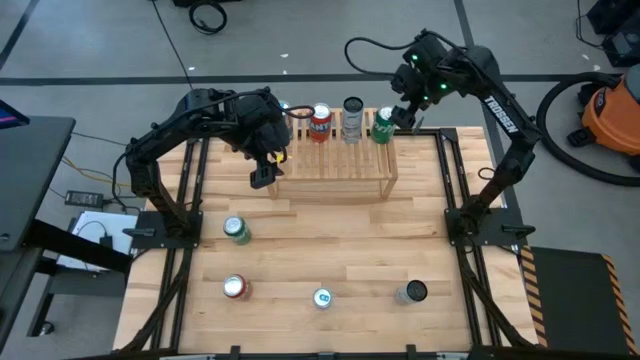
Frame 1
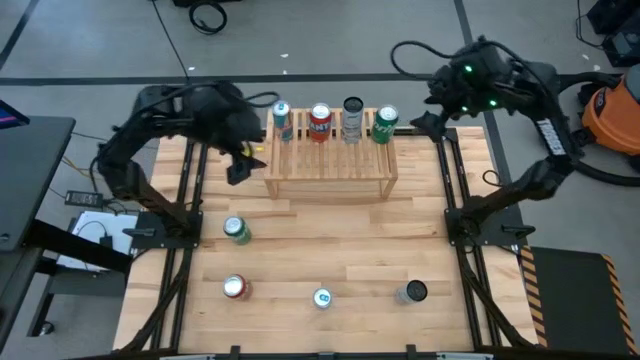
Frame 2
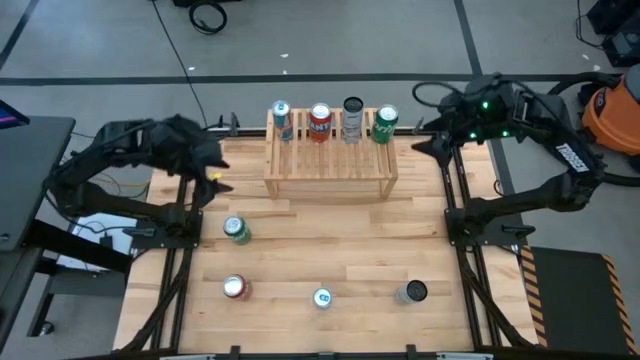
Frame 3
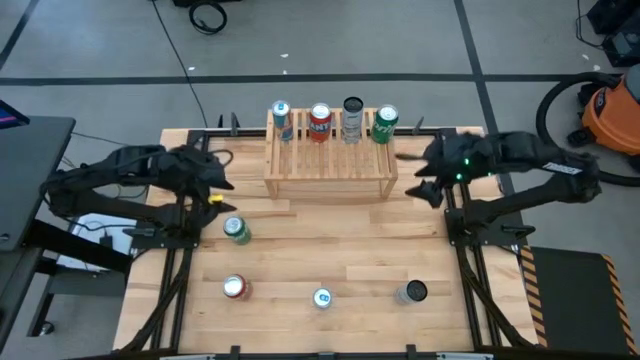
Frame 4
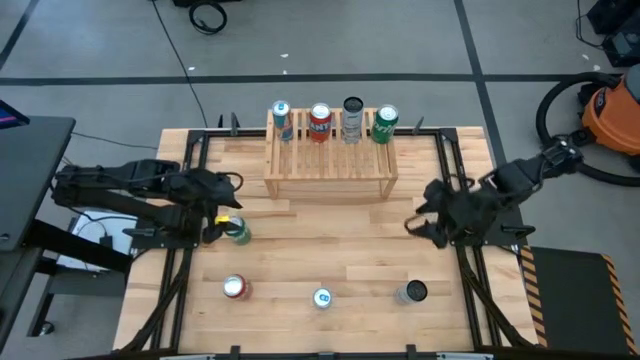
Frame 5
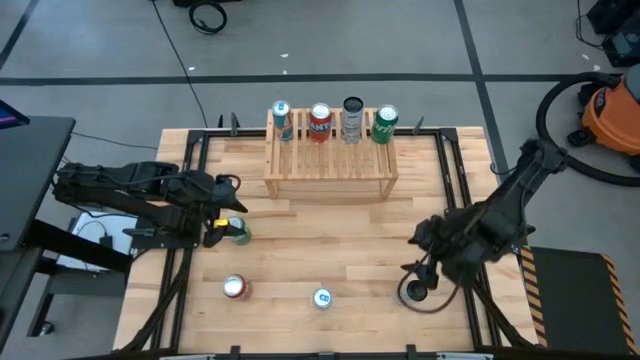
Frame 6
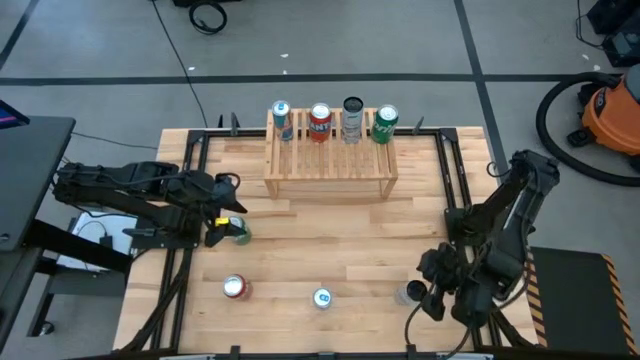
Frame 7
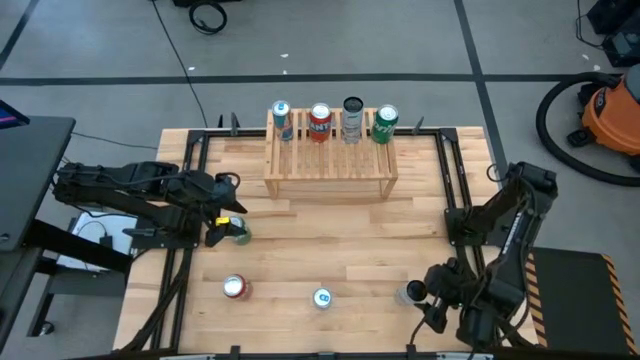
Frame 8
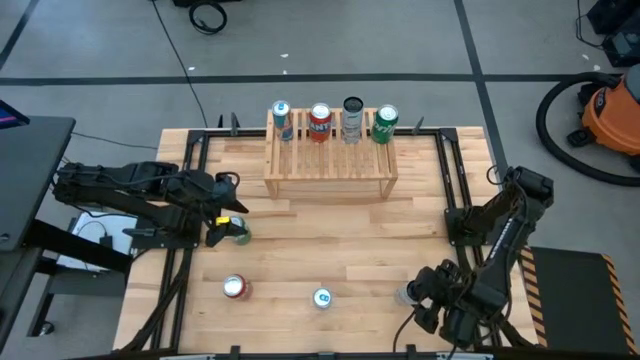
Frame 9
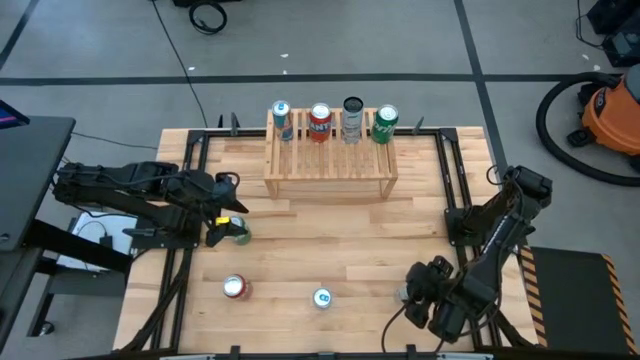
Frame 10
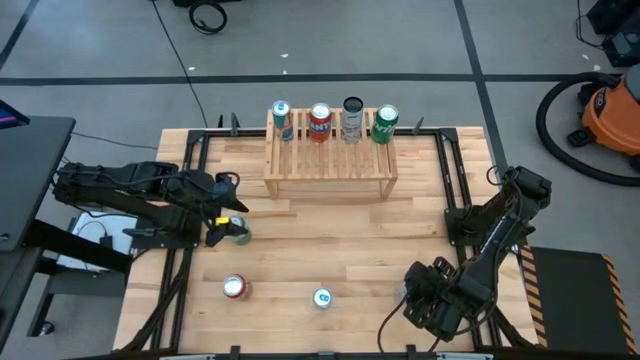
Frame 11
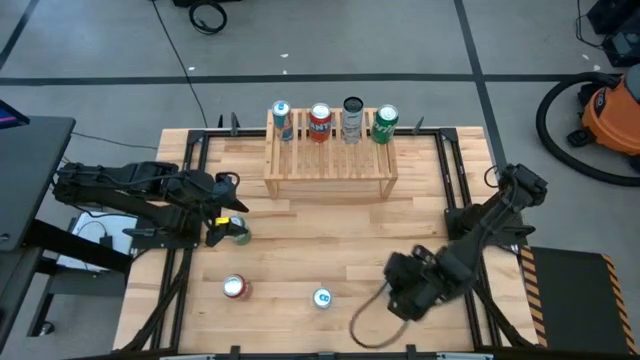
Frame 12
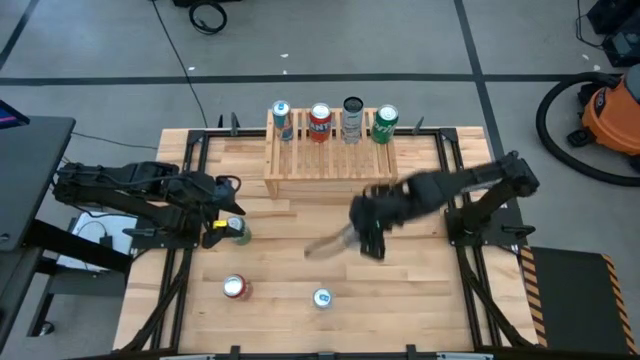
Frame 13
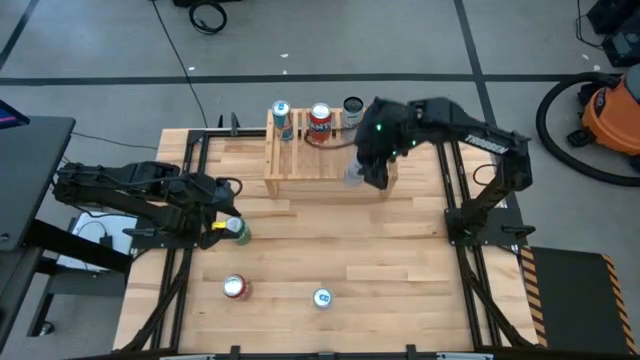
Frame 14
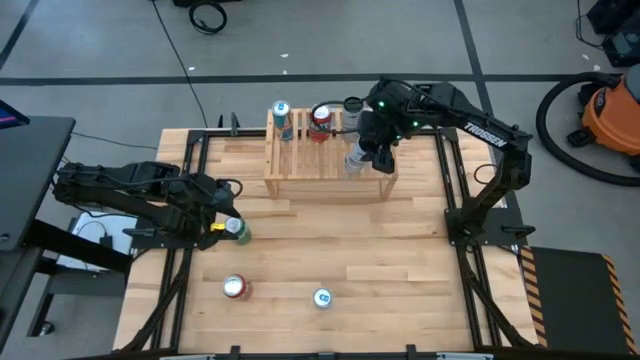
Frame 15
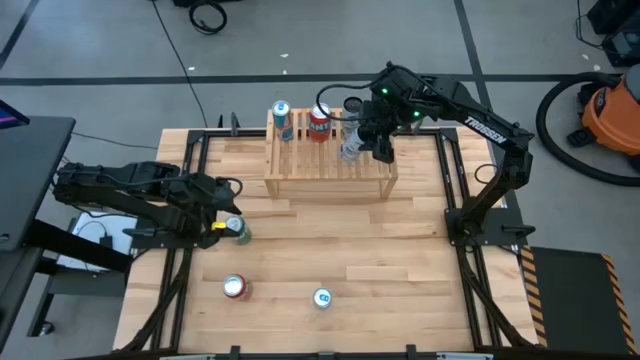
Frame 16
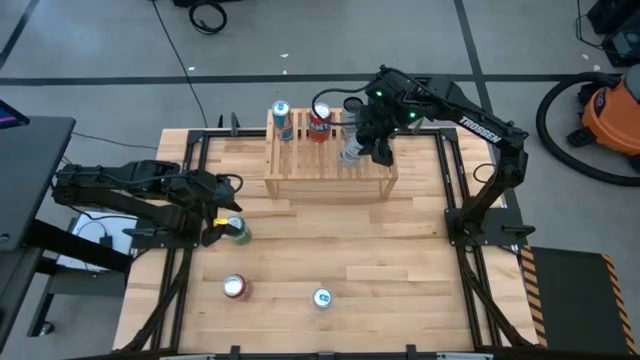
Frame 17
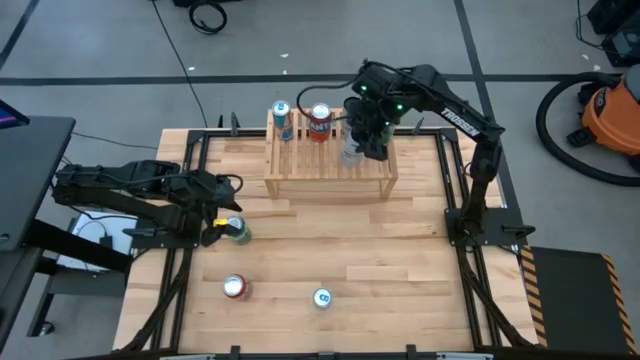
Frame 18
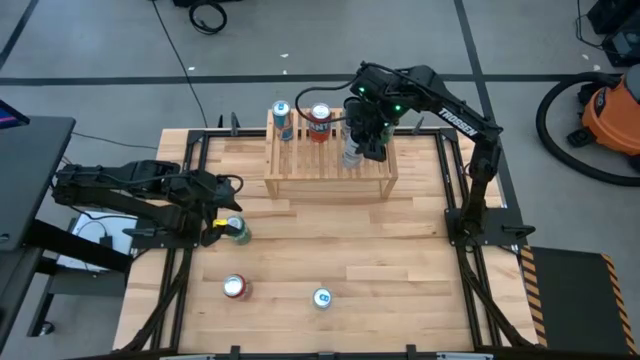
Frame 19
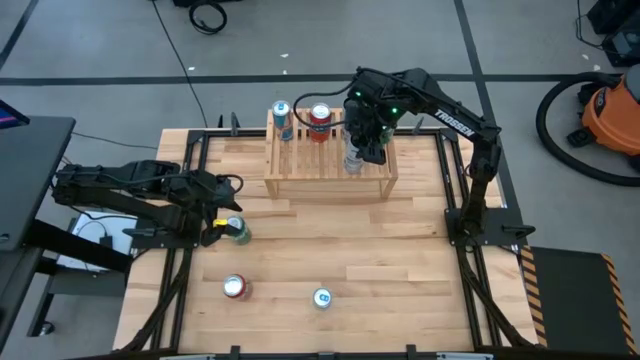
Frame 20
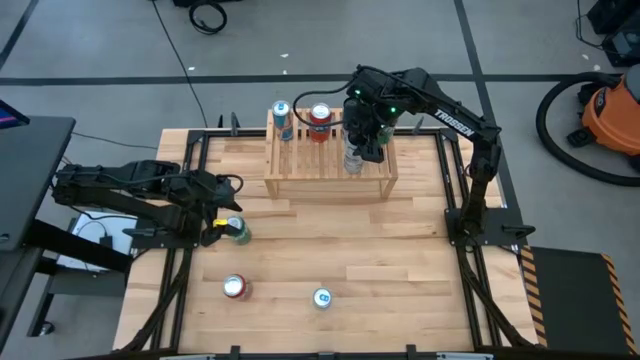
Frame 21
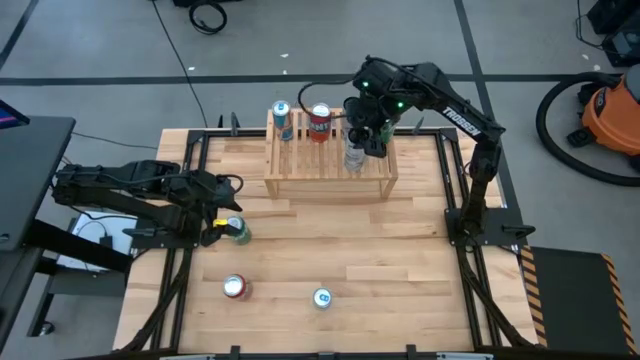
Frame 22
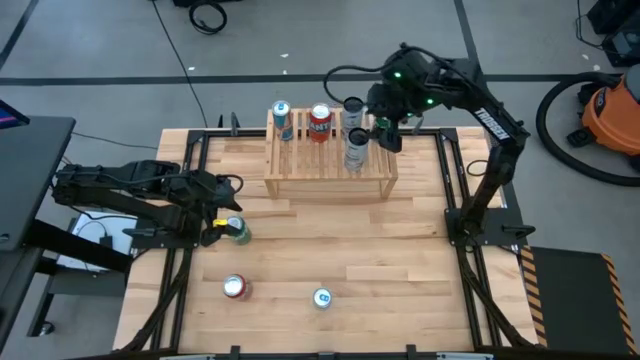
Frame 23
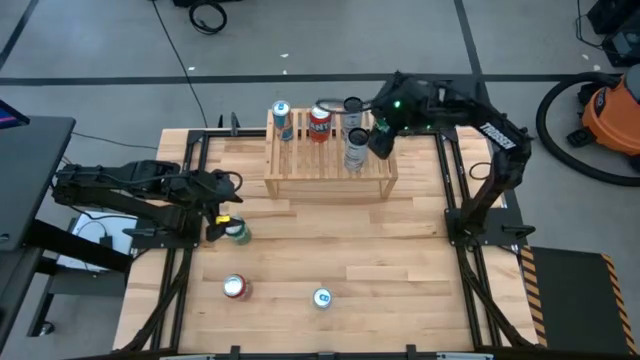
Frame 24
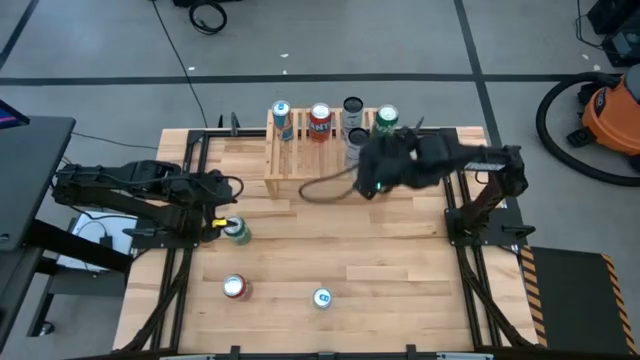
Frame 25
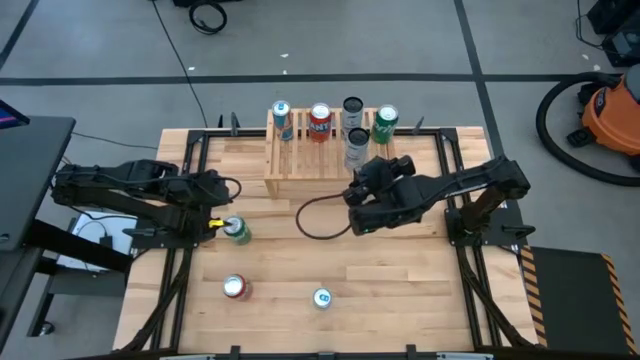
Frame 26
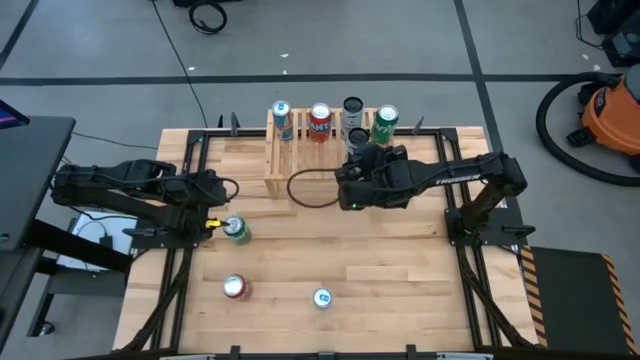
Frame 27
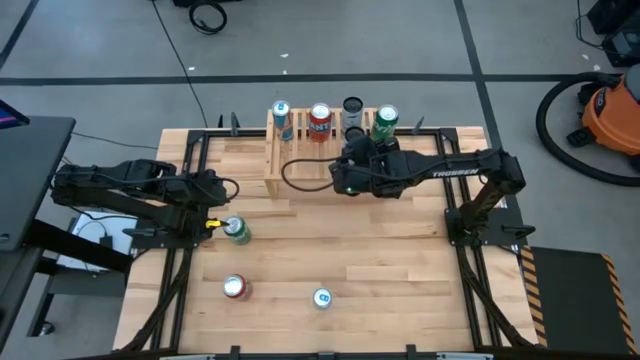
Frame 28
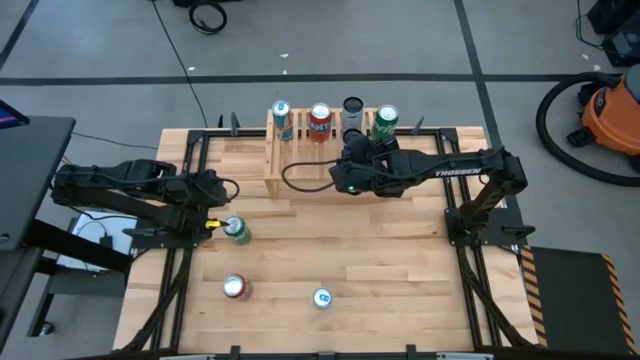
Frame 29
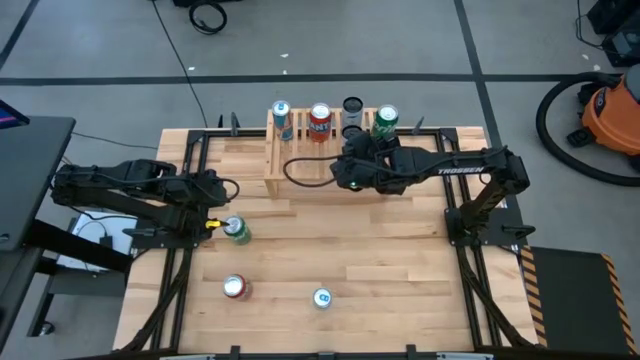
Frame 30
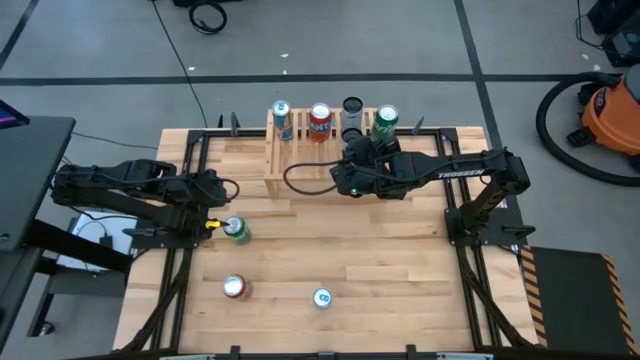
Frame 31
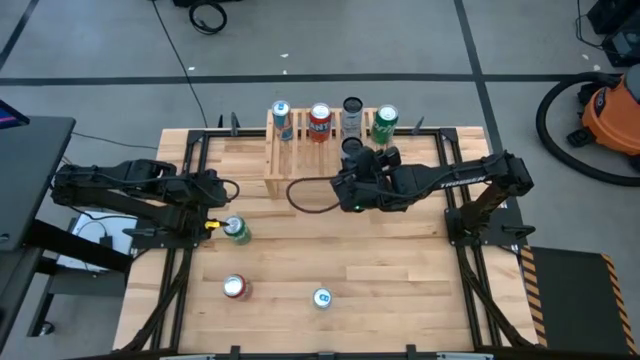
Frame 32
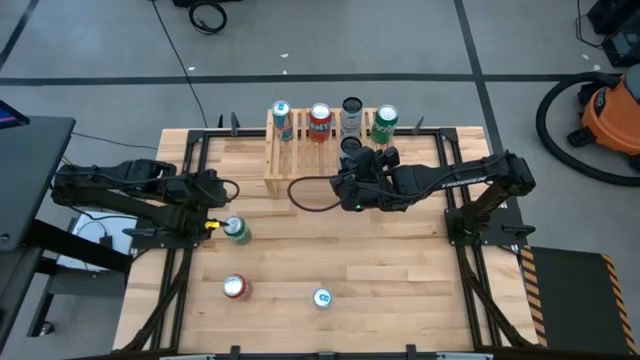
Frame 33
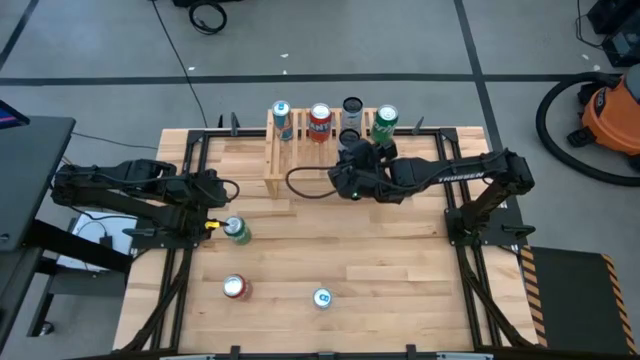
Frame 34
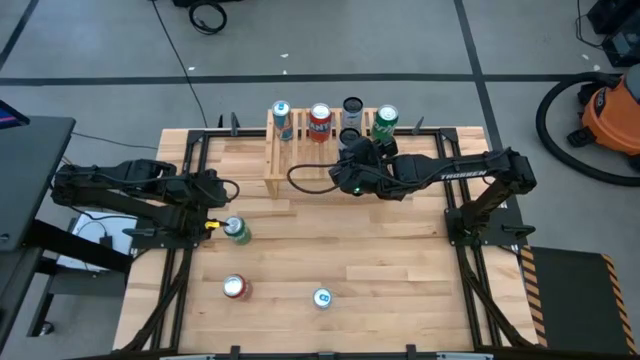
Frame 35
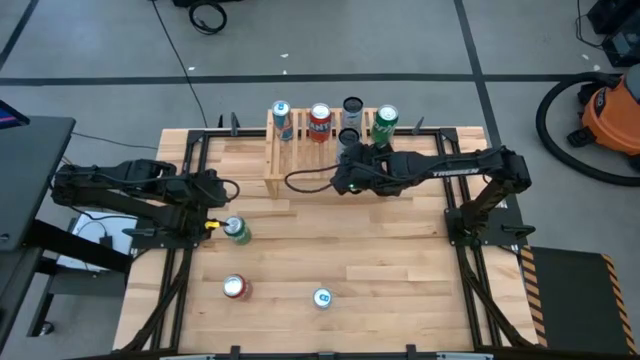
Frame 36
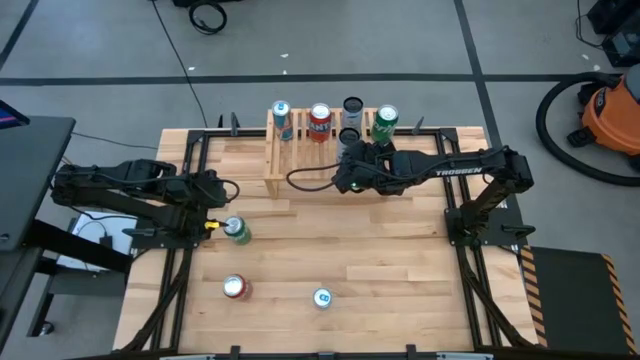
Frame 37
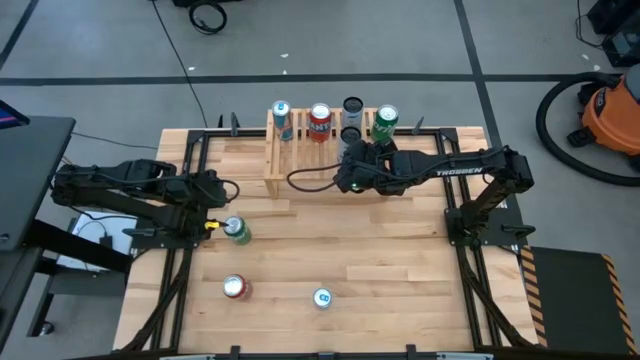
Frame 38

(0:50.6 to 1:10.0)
Task: Place canned beverage on shelf
Put the white-blue soda can on the shelf aligned with the other white-blue soda can

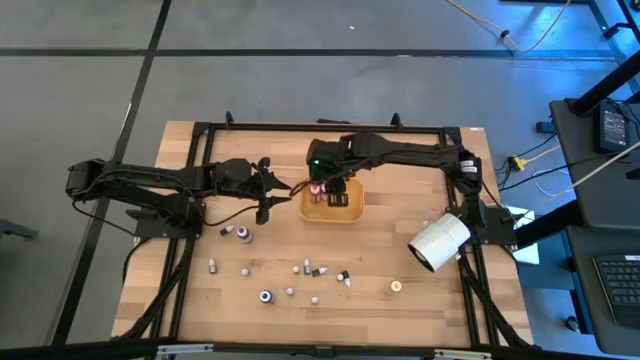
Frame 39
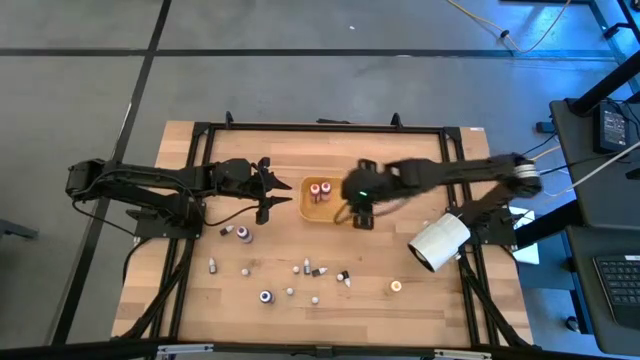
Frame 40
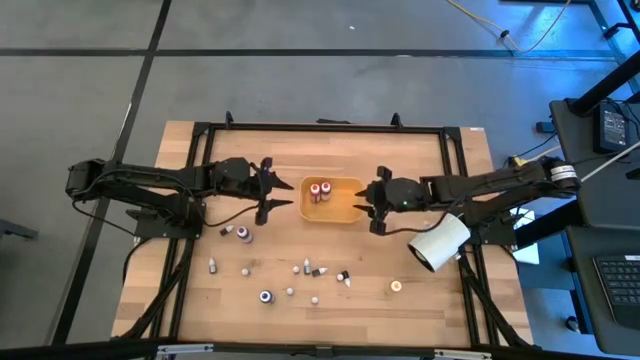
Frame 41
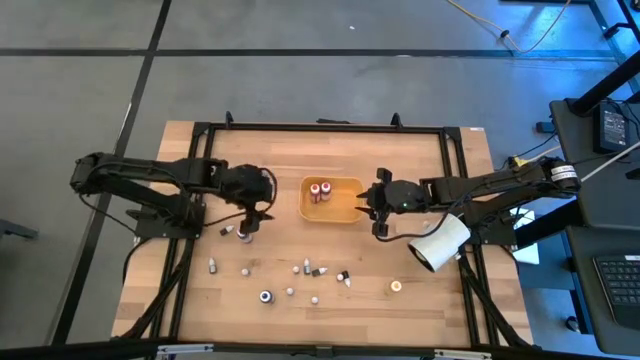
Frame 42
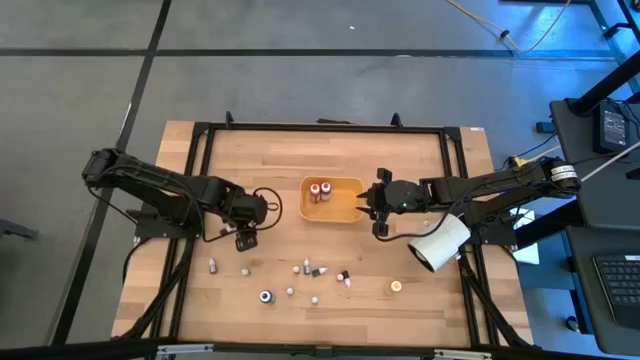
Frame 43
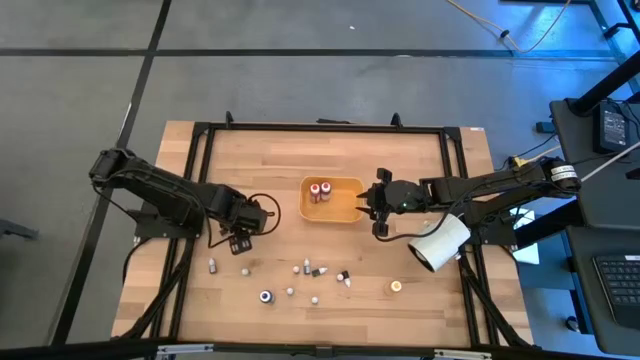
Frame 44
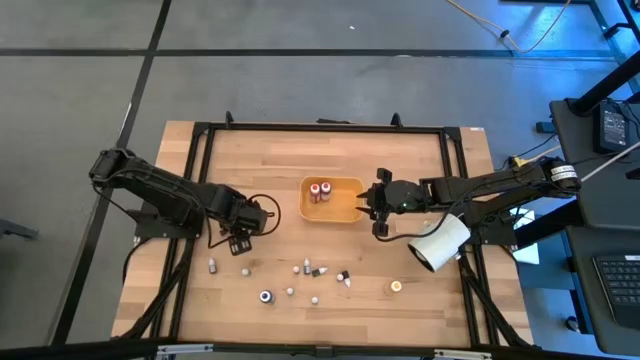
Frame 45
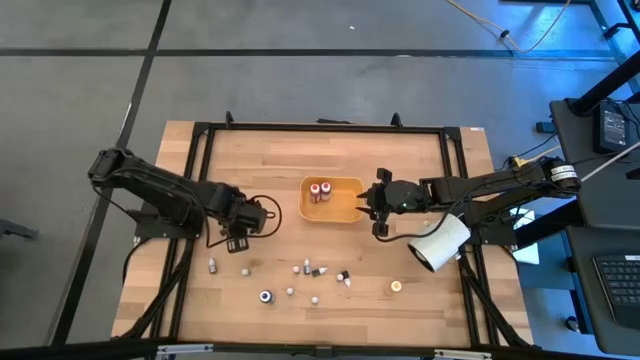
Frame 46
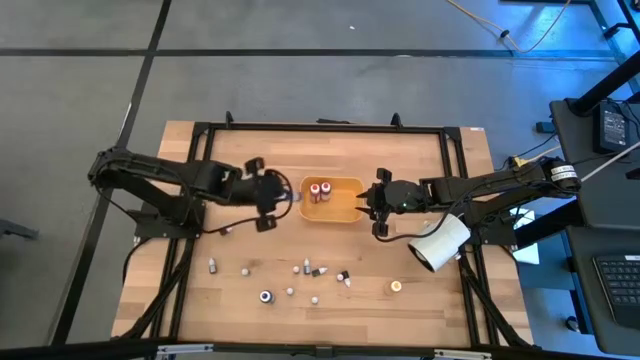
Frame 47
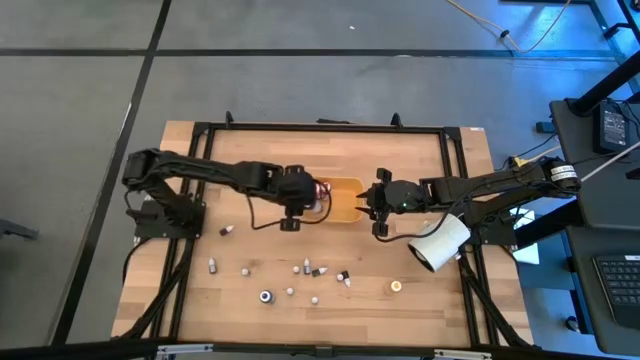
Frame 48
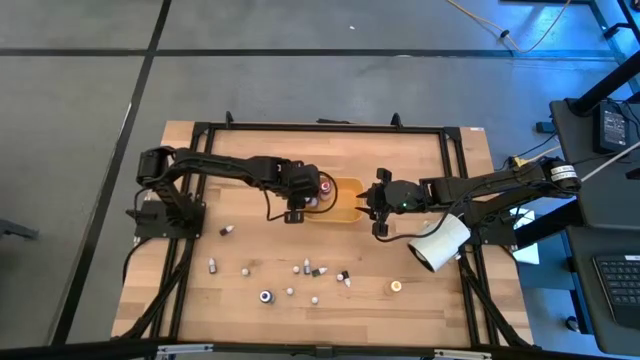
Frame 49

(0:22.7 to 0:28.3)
Task: Pick & Place food coloring
Put the big purple food coloring bottle into the yellow bin
